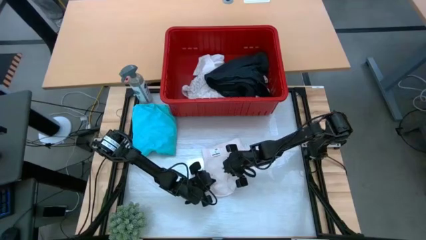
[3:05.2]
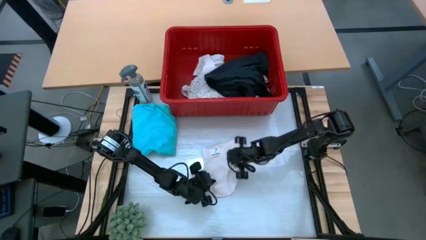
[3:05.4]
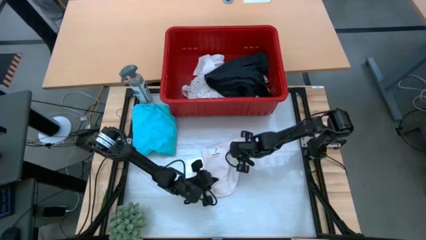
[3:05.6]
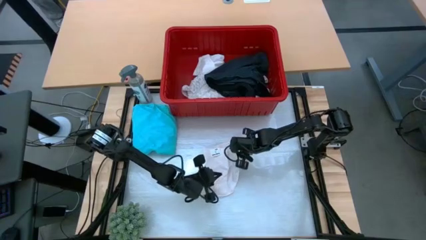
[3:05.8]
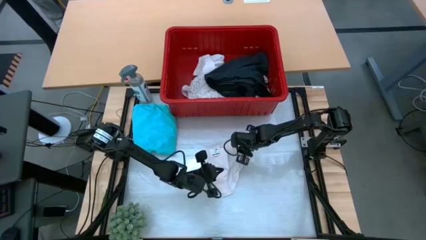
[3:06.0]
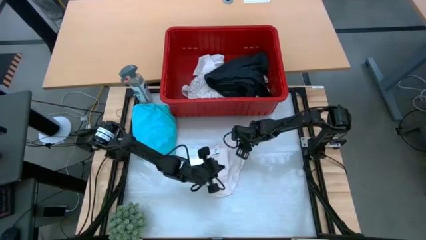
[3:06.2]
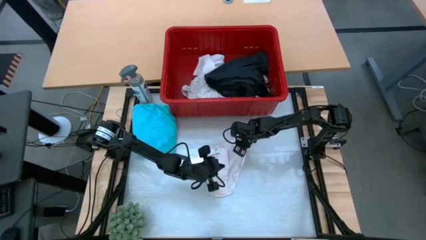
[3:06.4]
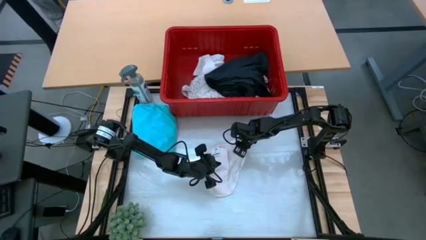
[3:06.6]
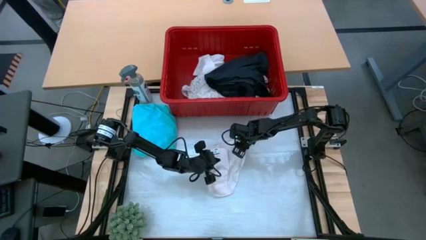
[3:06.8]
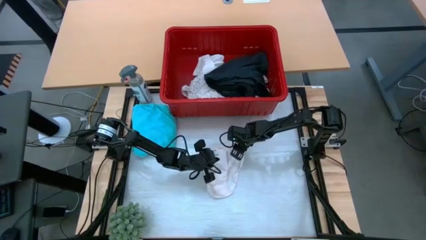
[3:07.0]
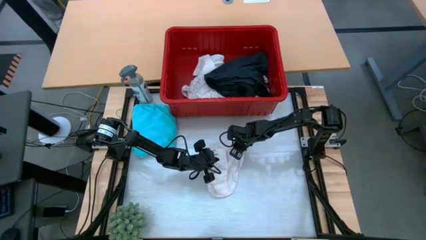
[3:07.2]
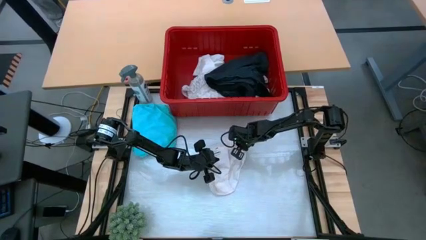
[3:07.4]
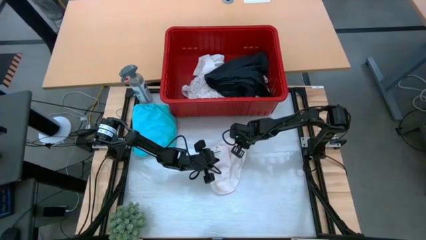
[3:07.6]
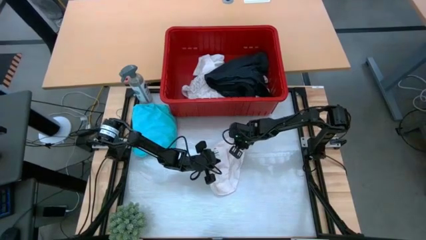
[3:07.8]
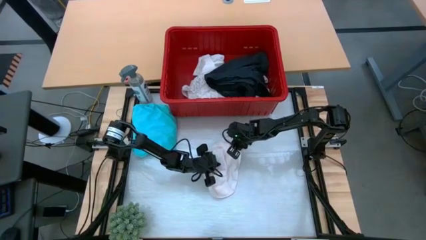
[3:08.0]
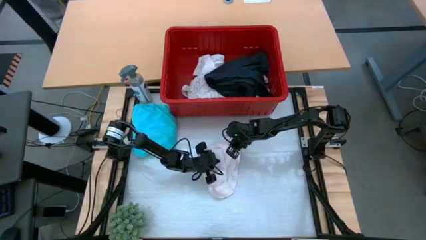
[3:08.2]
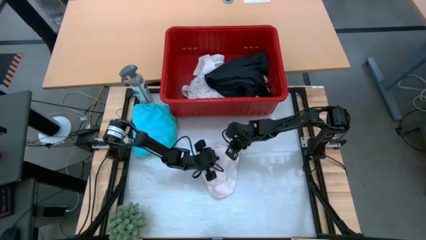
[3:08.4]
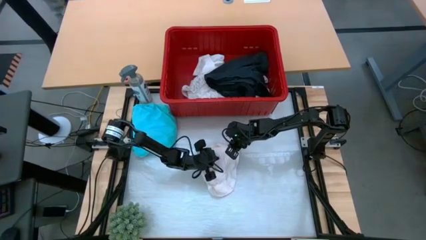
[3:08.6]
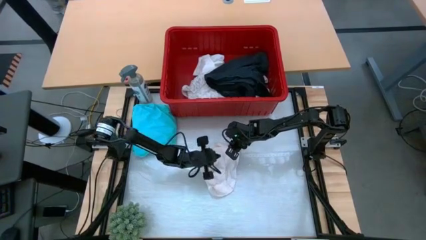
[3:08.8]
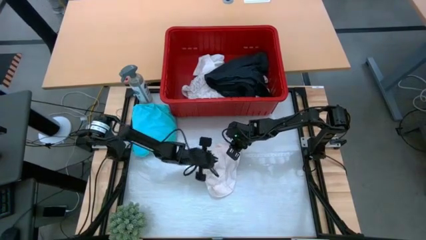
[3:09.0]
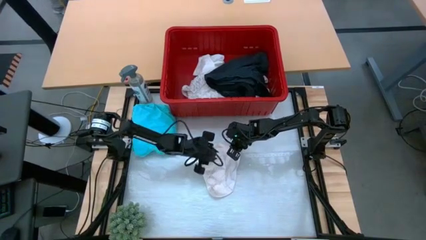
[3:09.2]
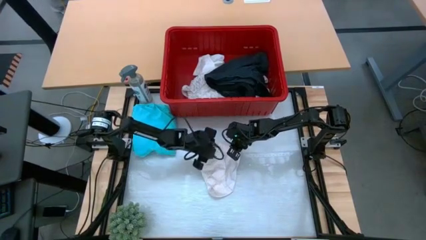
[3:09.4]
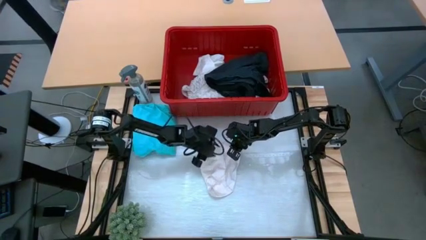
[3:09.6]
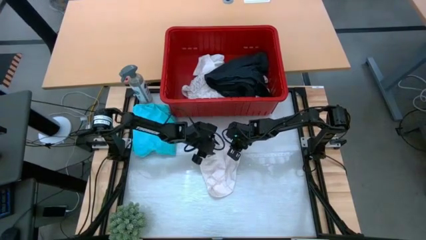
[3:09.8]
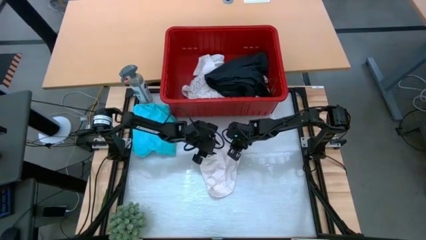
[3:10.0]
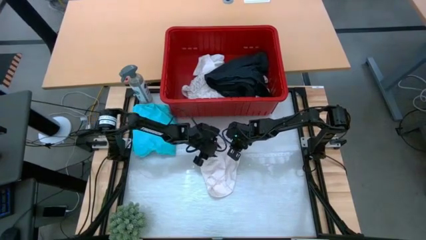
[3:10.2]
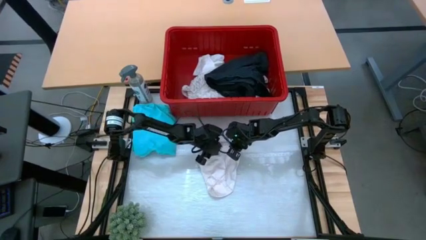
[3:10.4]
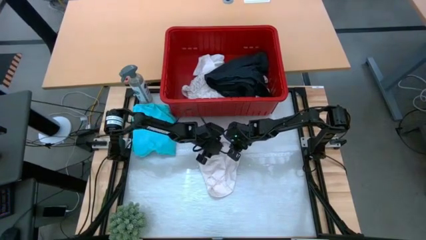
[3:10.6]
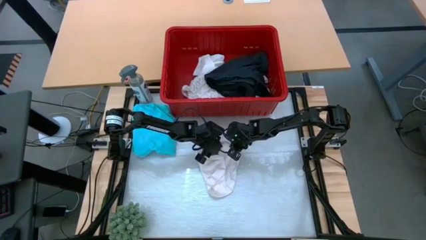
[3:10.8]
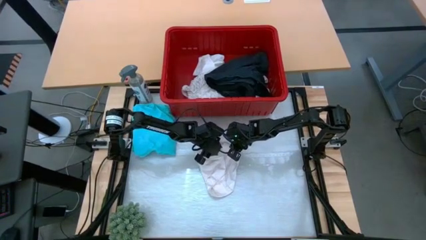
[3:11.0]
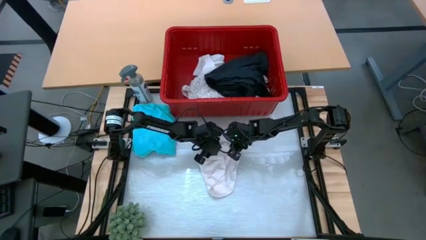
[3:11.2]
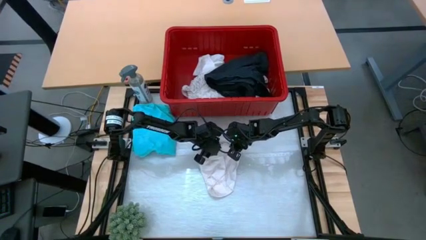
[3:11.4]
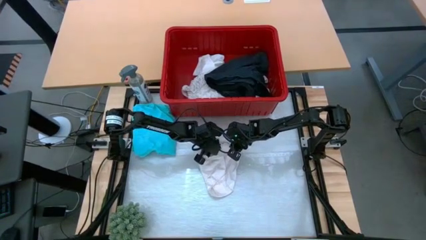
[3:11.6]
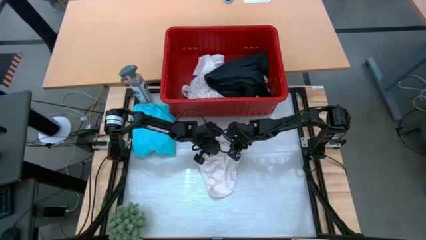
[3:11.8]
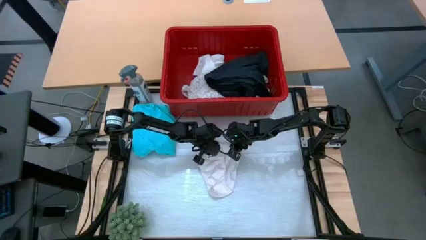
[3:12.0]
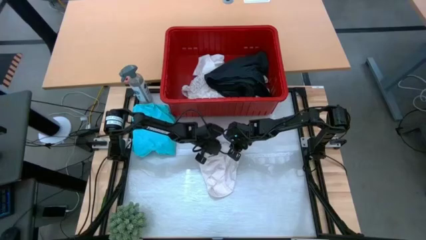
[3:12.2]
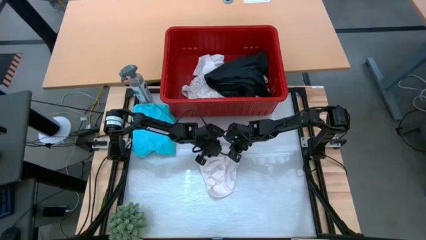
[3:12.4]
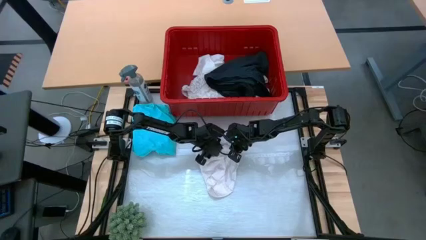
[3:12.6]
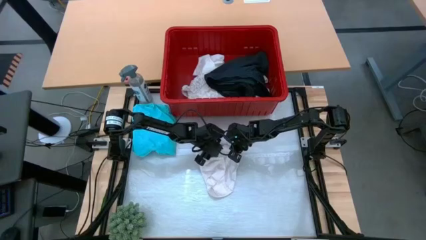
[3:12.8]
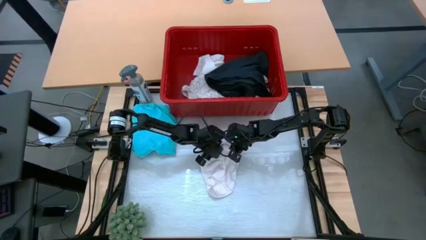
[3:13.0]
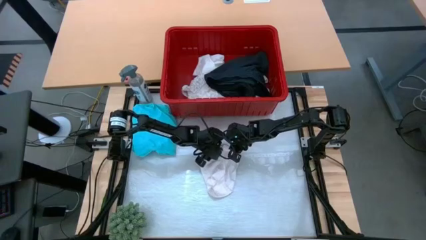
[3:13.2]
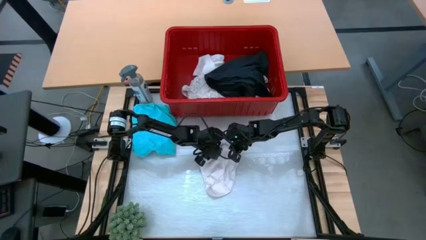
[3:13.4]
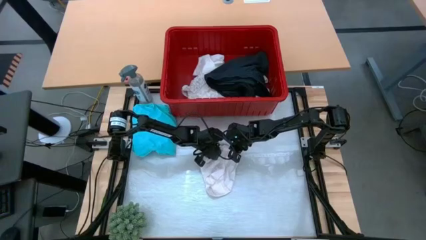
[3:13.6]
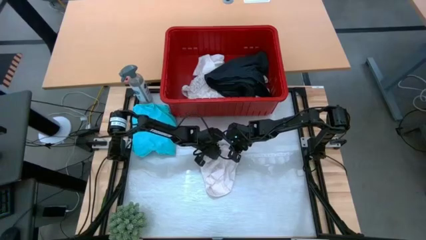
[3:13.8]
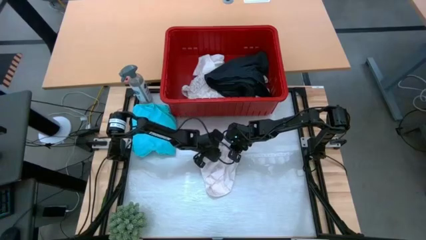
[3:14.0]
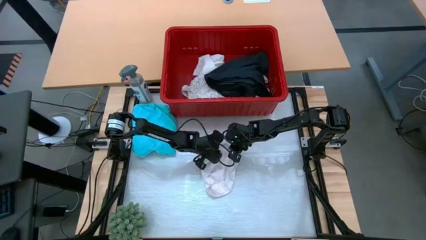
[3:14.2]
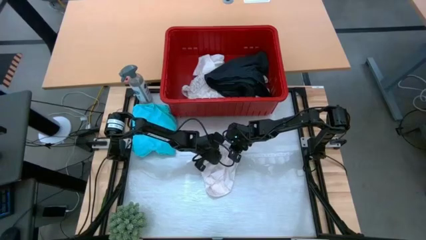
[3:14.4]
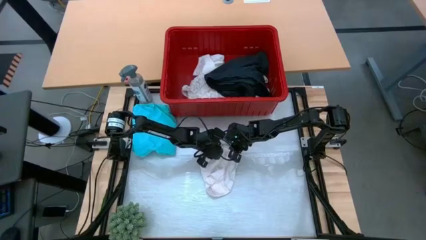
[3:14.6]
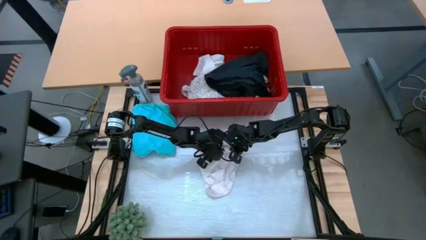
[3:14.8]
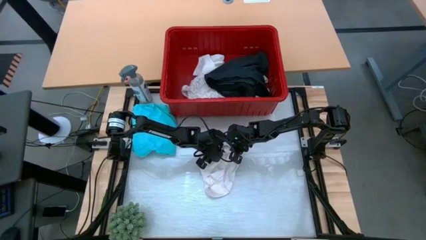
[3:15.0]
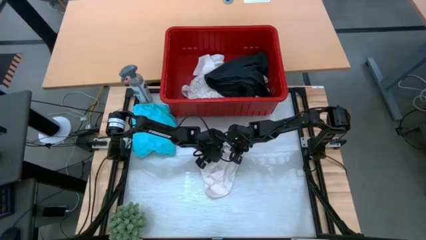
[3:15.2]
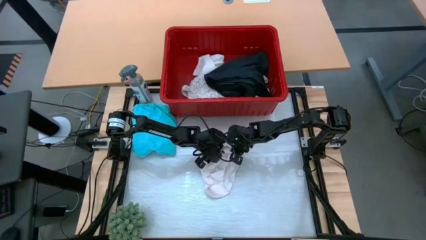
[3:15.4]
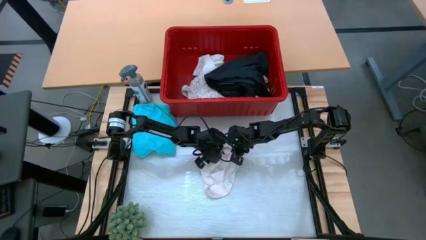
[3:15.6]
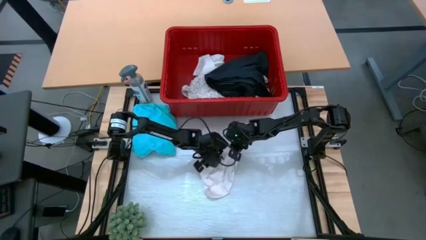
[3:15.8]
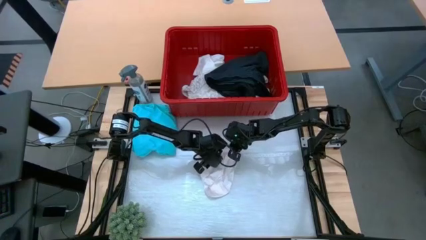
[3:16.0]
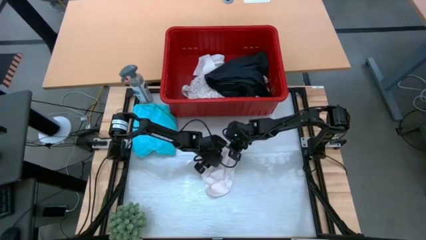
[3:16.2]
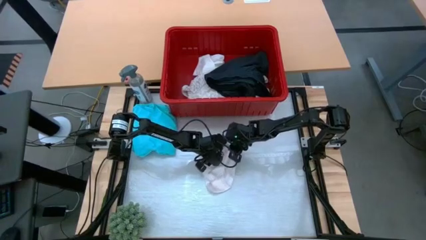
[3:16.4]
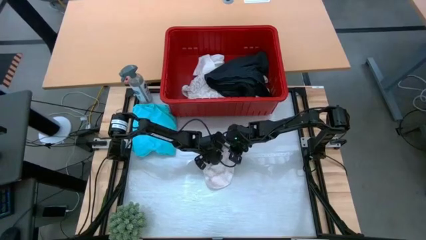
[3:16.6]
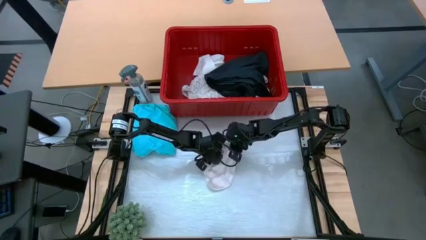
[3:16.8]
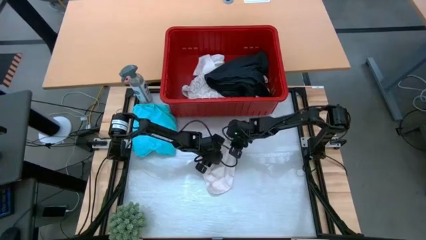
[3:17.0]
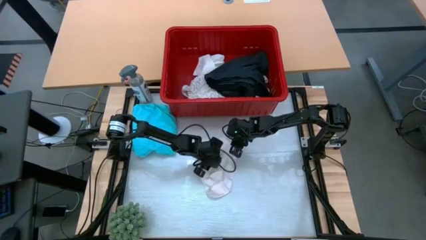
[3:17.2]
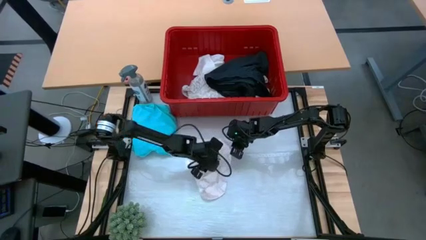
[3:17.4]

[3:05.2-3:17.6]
Task: Fold laundry
Fold the white underwear

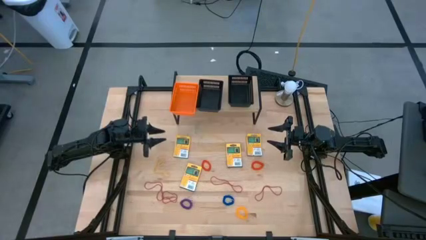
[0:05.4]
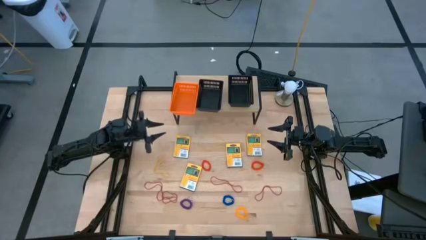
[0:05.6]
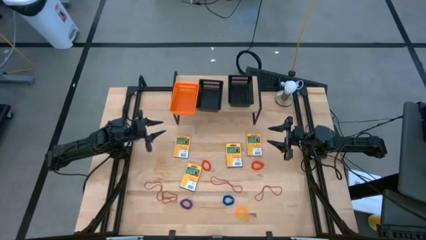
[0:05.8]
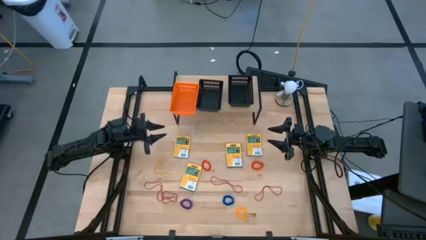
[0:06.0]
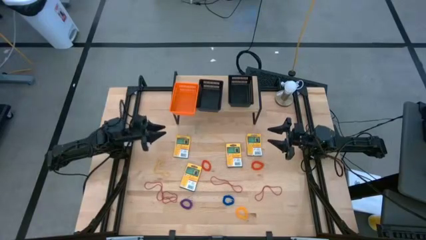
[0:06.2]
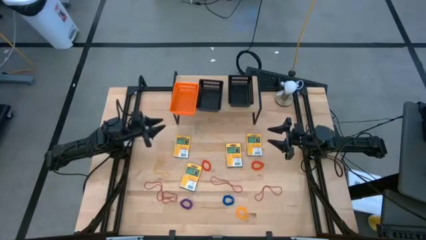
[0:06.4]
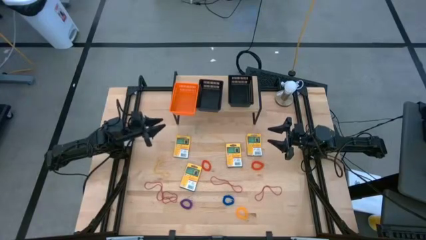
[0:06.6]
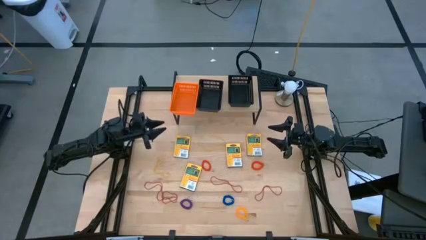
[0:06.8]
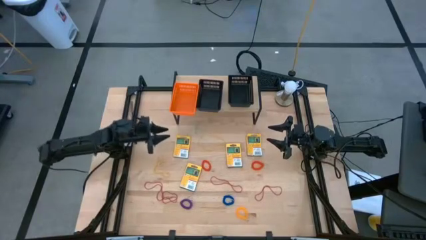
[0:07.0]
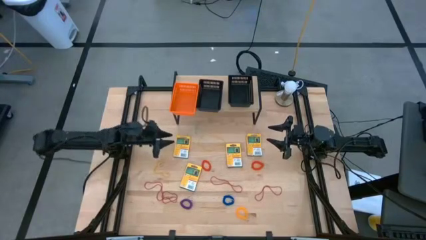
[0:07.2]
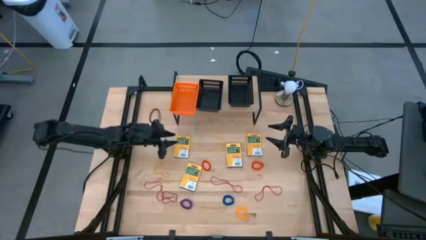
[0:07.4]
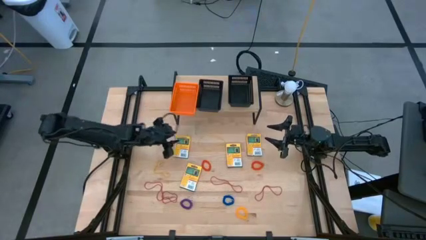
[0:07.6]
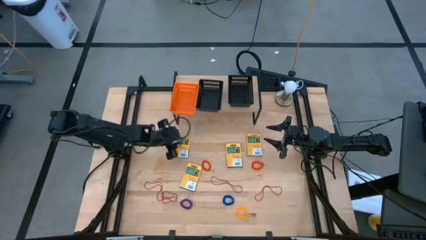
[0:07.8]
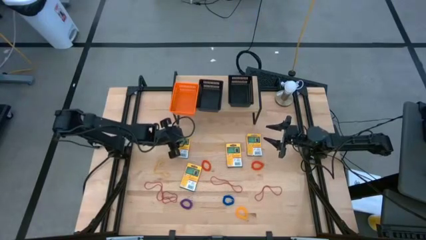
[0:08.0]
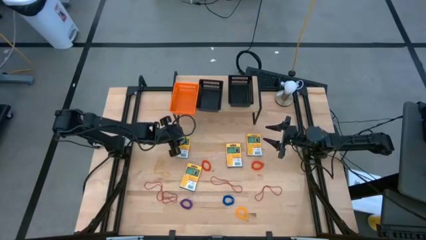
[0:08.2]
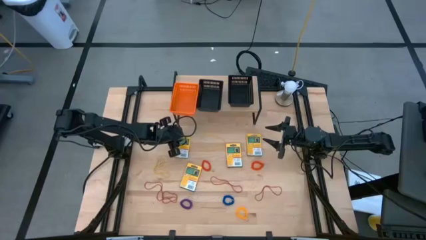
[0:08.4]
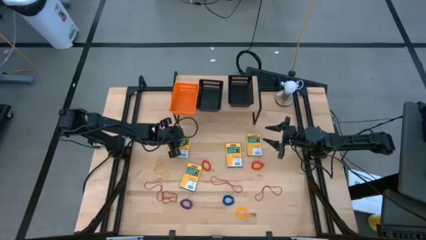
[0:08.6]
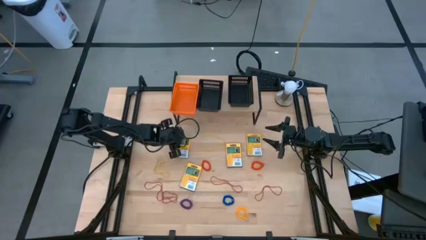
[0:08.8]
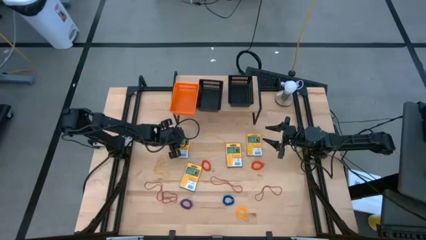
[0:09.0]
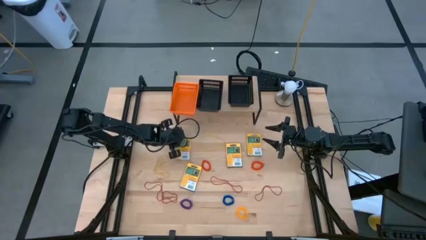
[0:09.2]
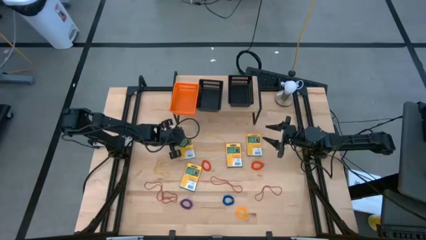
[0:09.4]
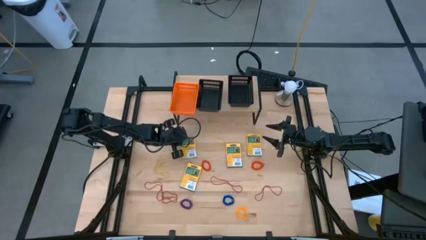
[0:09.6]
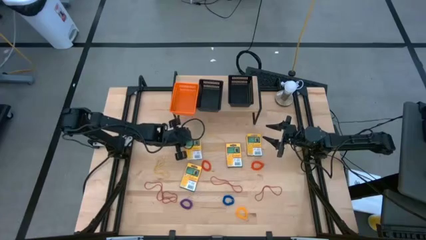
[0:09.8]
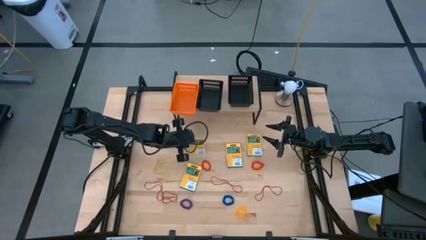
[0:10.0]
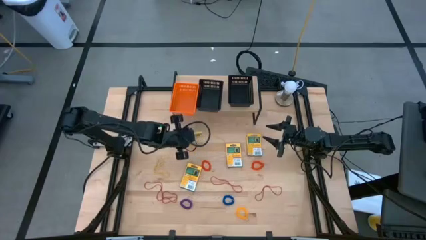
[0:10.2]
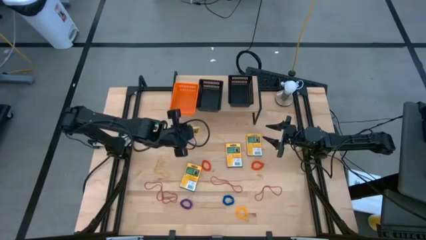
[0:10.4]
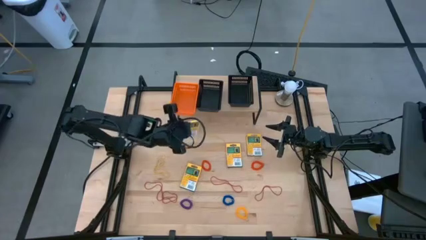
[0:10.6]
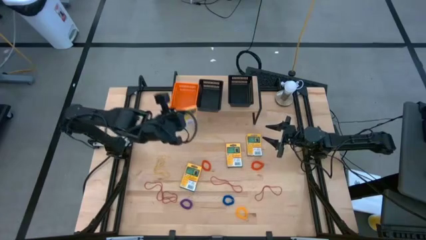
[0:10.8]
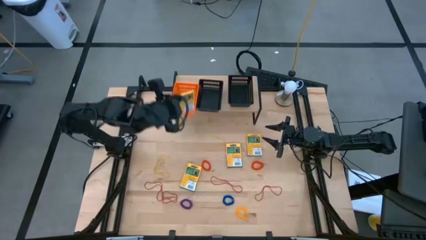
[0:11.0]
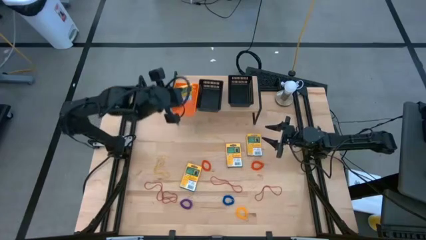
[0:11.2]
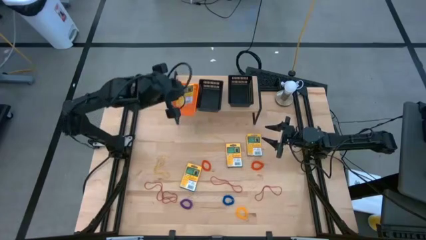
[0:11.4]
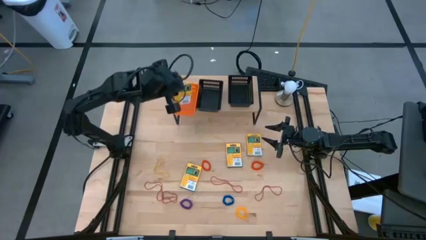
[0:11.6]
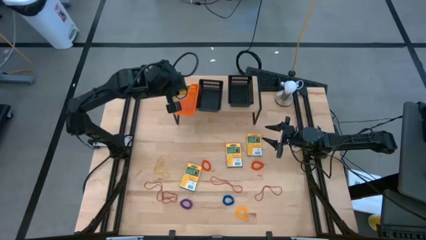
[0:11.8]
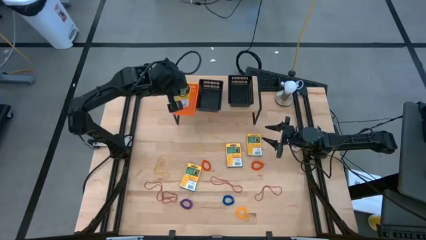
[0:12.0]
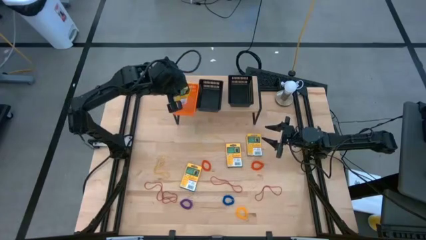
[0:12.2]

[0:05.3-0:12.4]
Task: Pick & Place Office Desk Supplies
Put the yellow pack of crayons into the orange bin on the shelf
